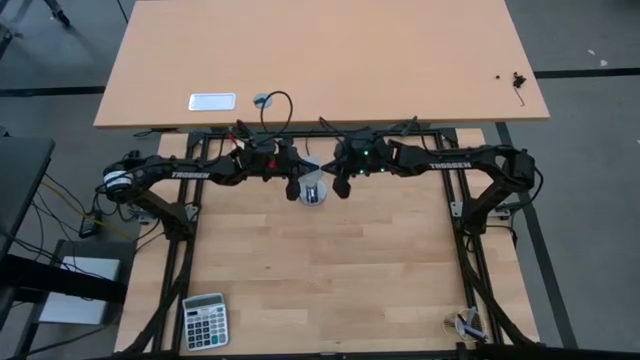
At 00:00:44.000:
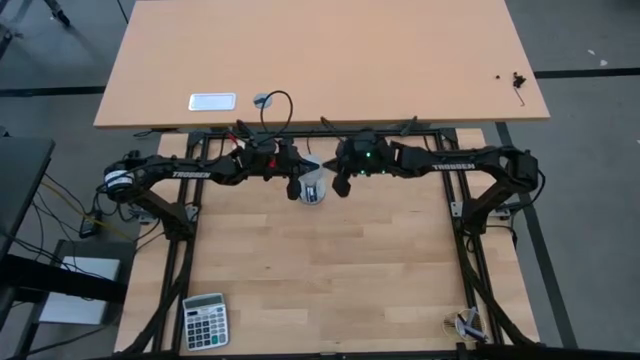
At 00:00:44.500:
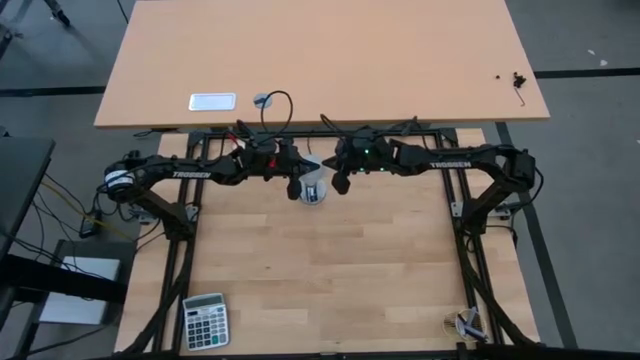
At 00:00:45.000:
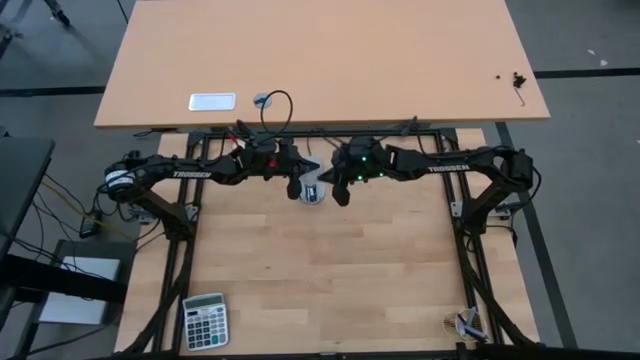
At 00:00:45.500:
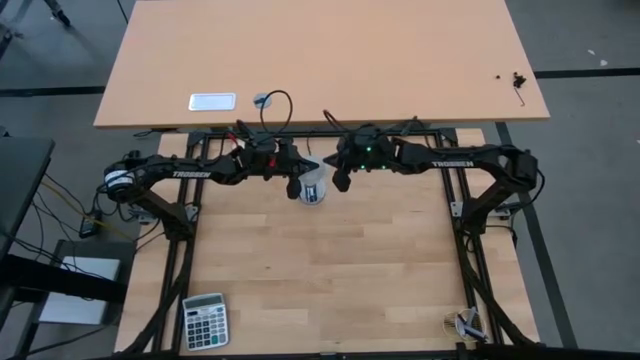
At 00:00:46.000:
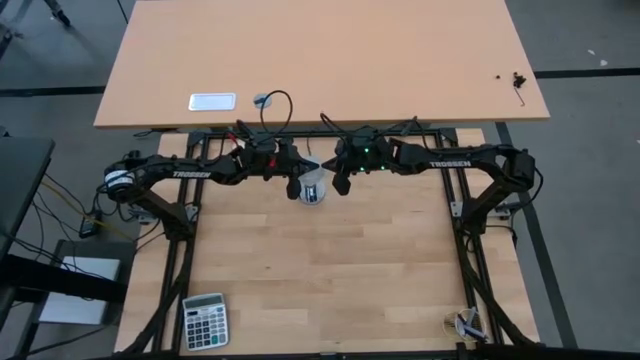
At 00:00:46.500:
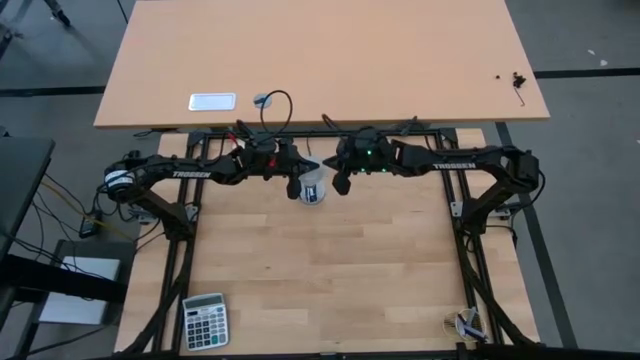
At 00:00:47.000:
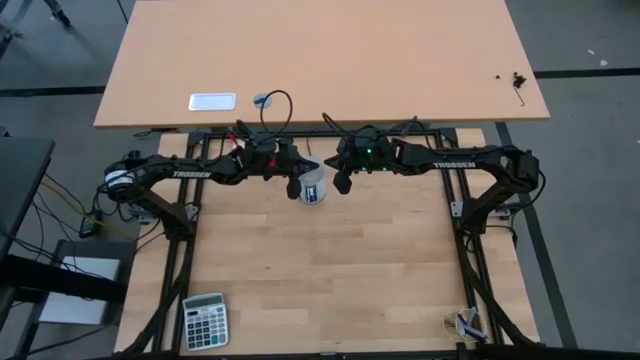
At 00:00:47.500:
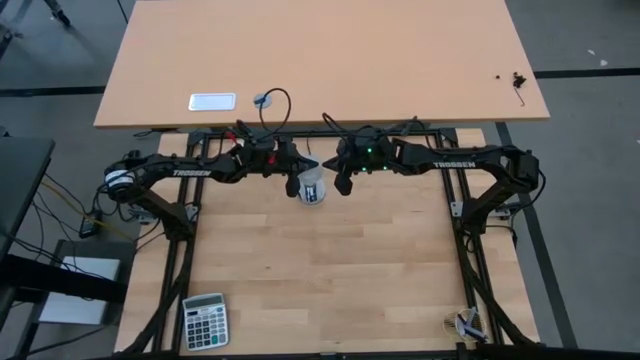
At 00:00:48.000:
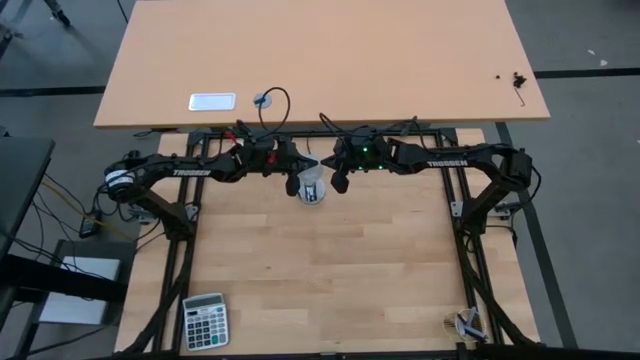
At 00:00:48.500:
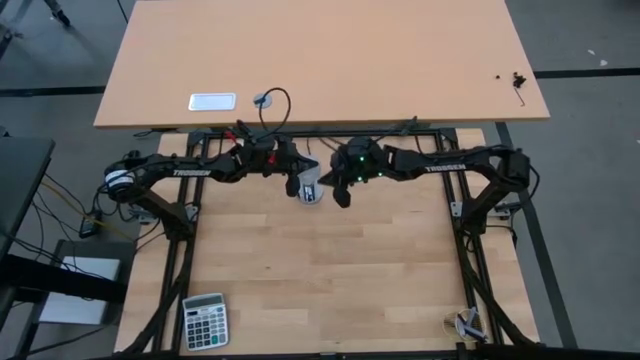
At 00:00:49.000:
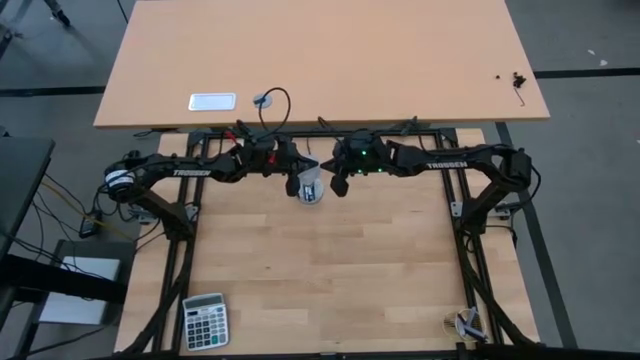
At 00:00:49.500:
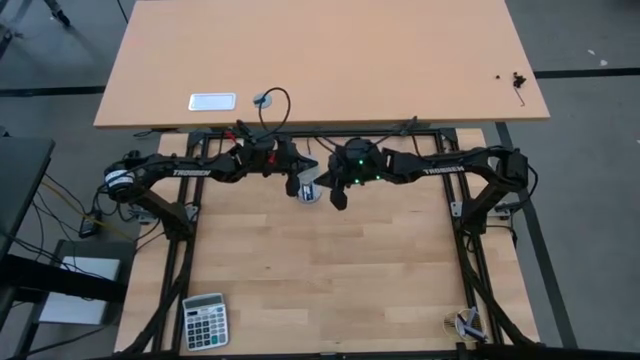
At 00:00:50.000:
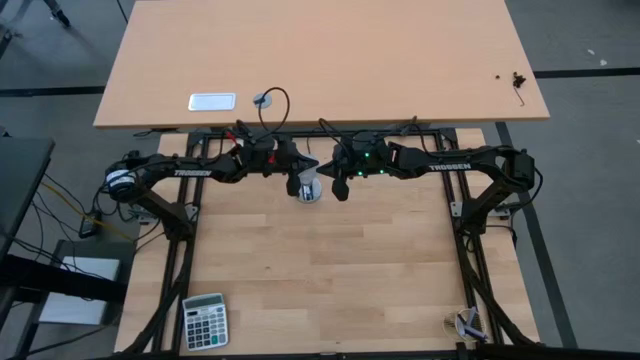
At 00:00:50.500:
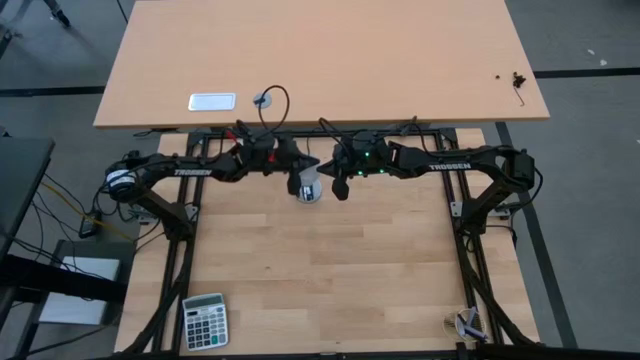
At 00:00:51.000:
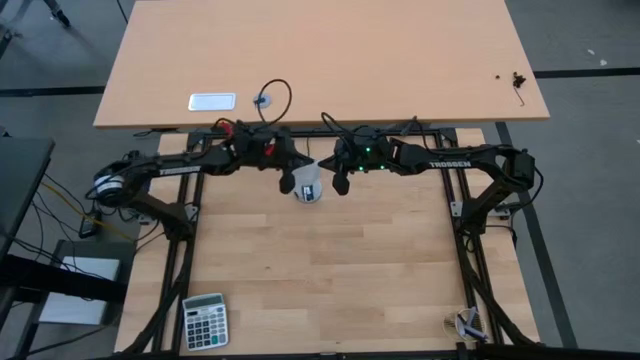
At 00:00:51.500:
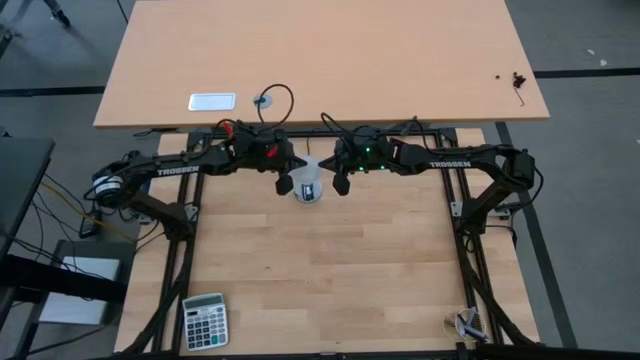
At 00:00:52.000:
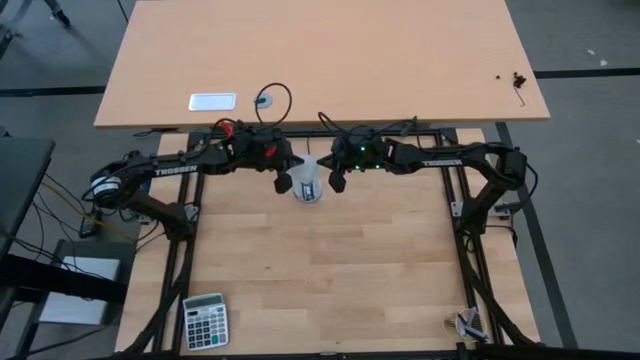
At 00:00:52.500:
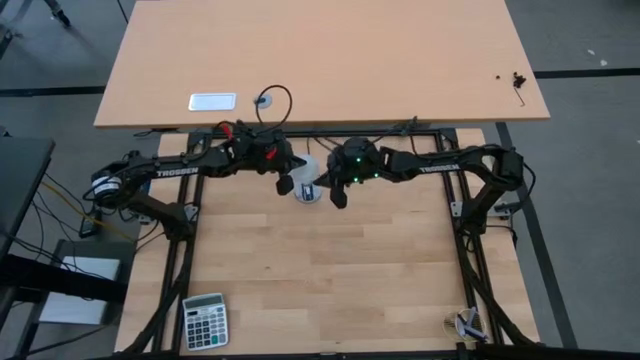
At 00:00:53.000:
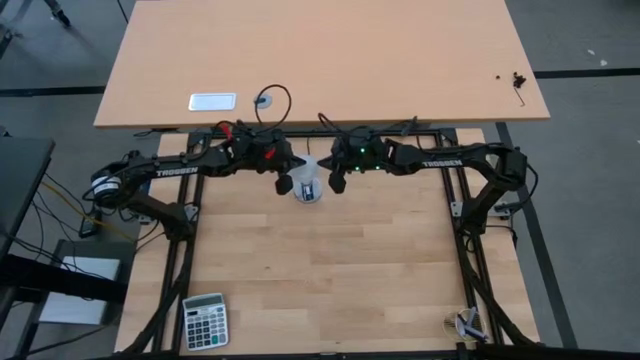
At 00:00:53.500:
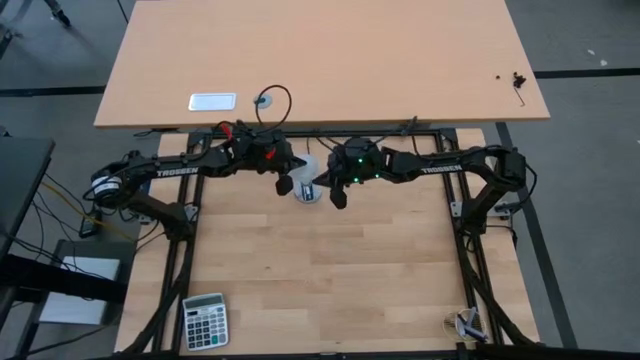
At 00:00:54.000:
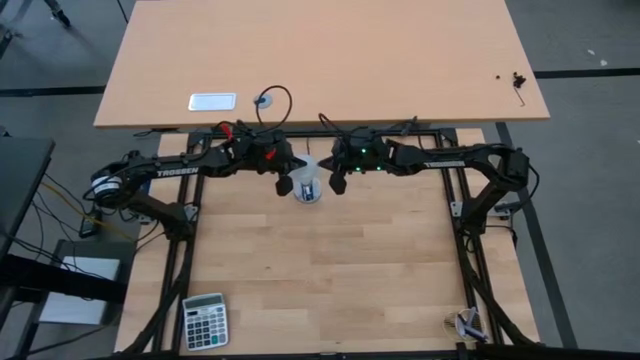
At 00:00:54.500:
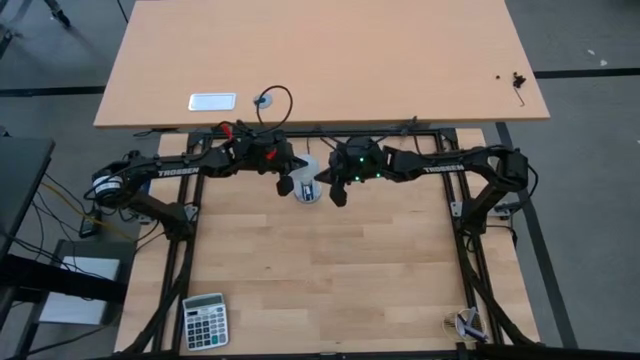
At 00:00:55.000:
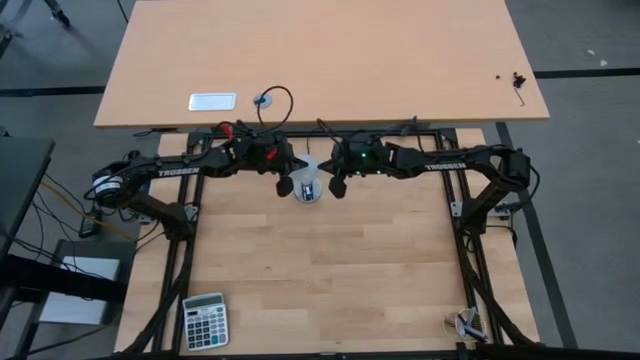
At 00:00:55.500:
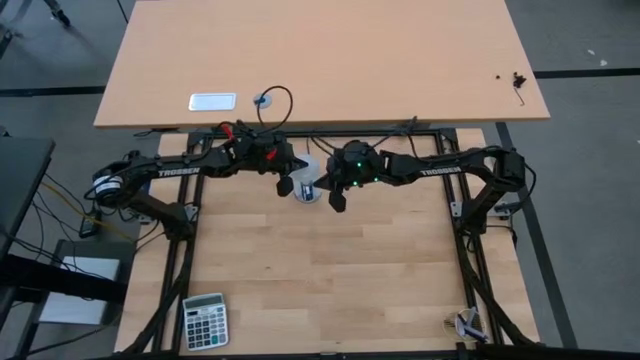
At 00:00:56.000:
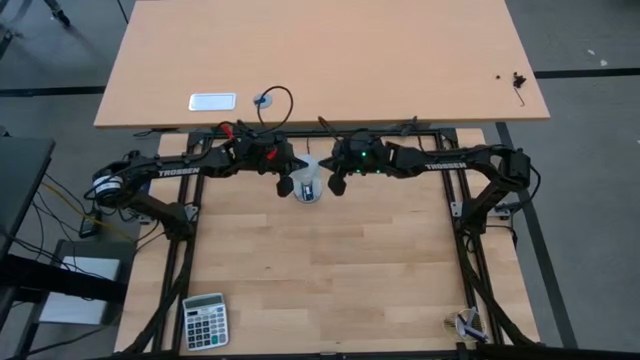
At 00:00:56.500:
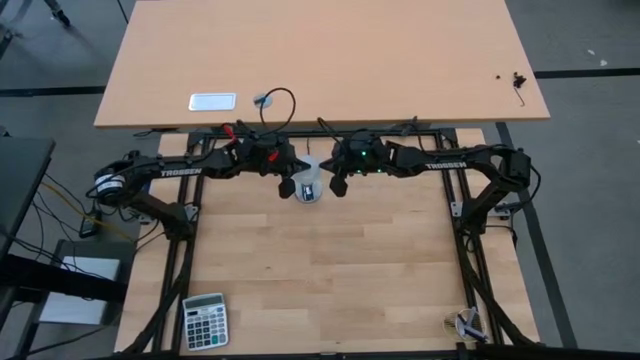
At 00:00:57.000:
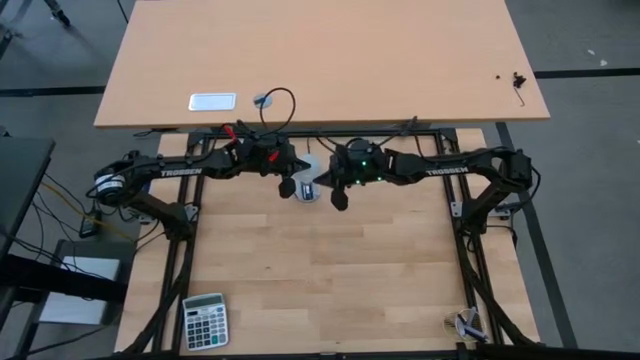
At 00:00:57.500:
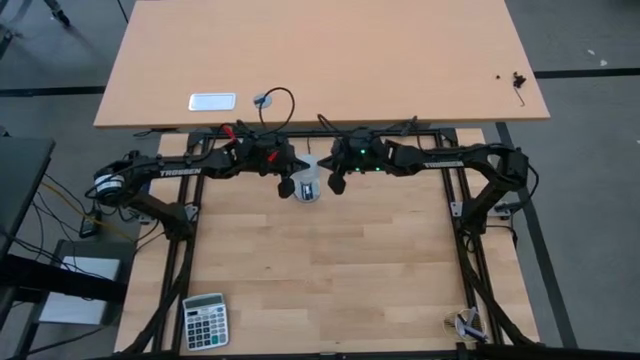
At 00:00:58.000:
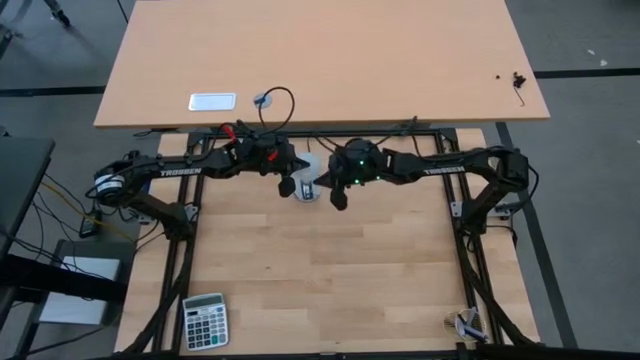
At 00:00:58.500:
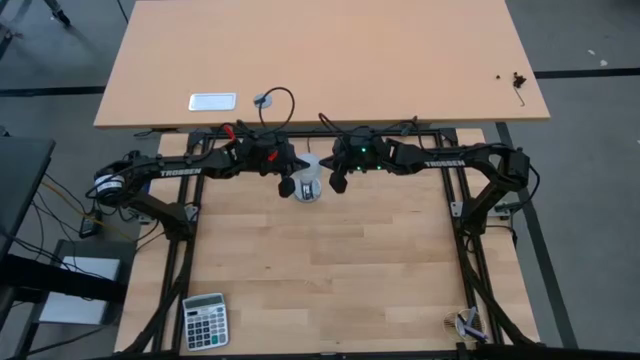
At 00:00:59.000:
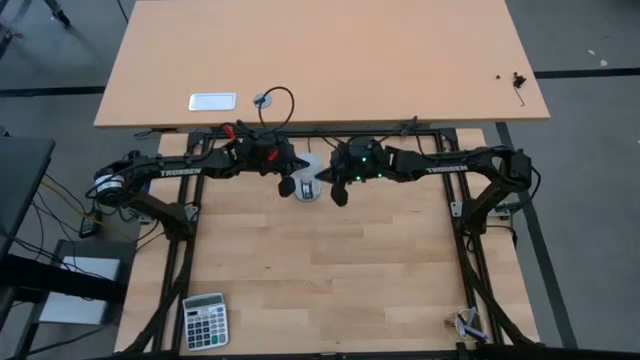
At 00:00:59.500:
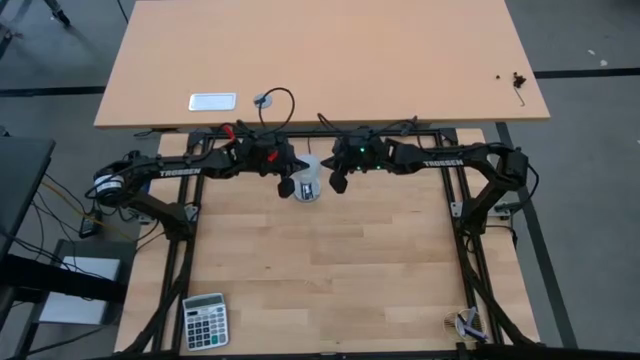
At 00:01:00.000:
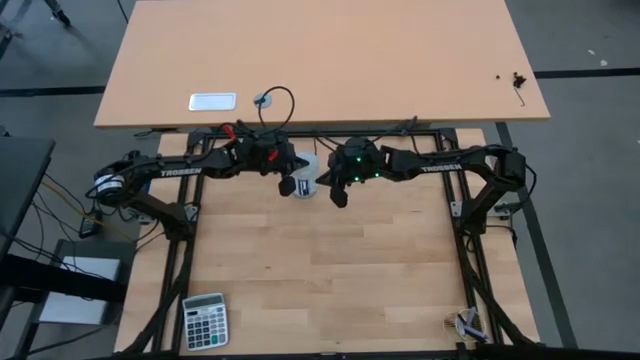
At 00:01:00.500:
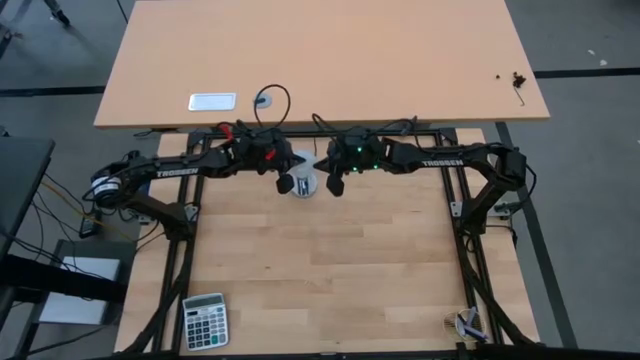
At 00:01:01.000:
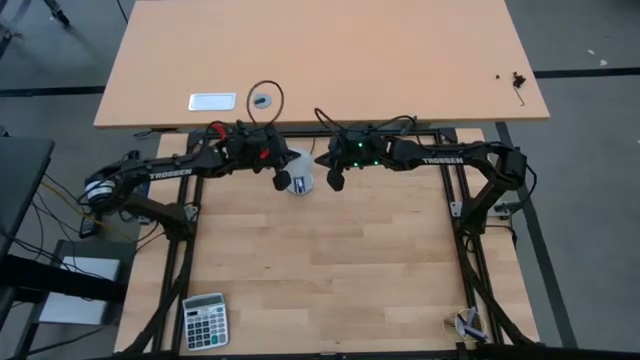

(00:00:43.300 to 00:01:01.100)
Task: Screw lightbulb
Insert the lightbulb into the lamp

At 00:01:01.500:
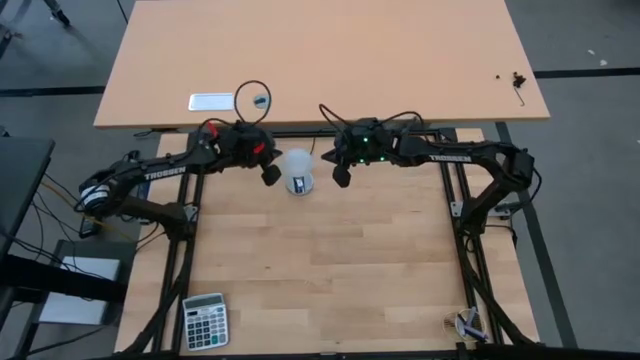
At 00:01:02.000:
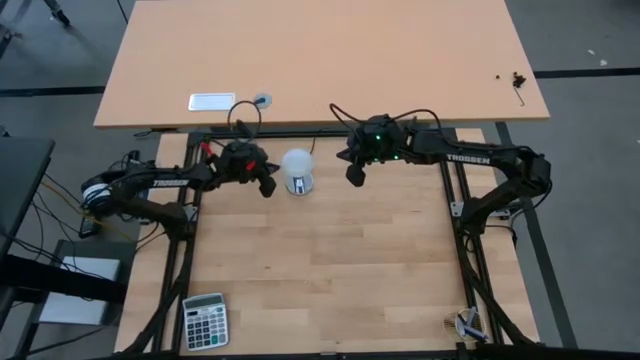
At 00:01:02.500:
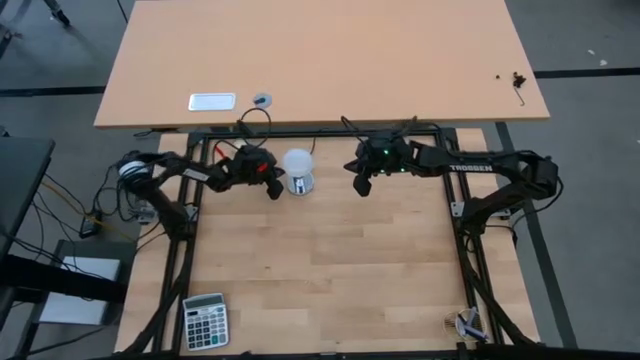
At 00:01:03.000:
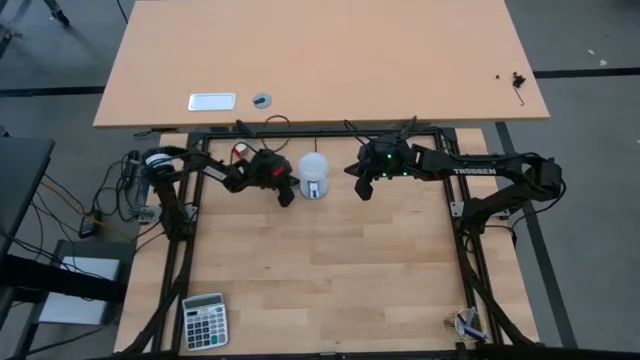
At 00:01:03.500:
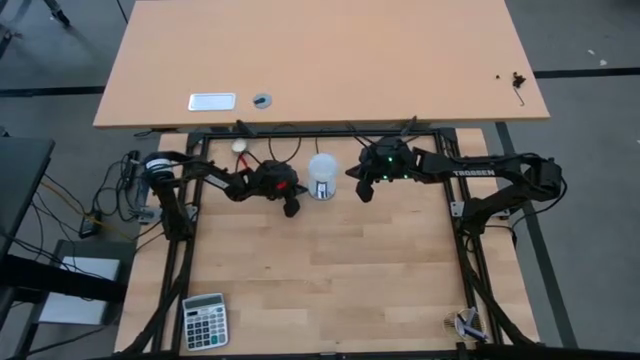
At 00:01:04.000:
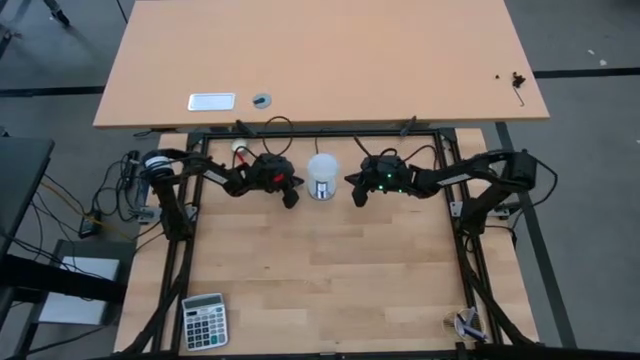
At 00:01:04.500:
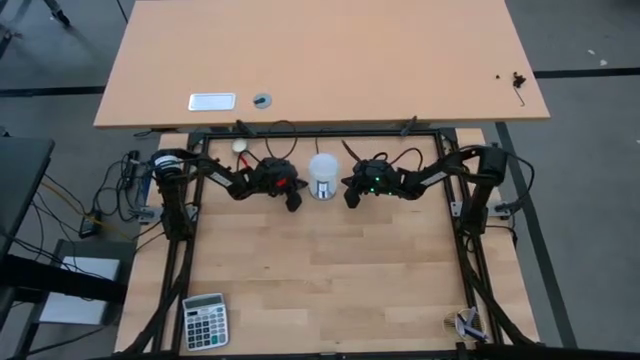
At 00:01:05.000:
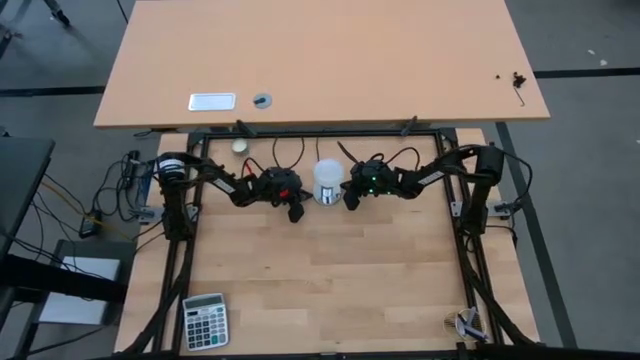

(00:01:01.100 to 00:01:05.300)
Move the lamp to the bottom
